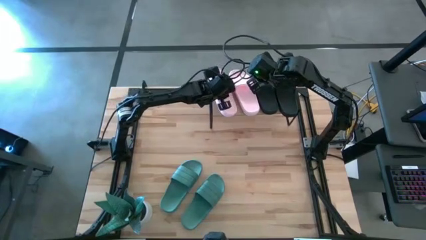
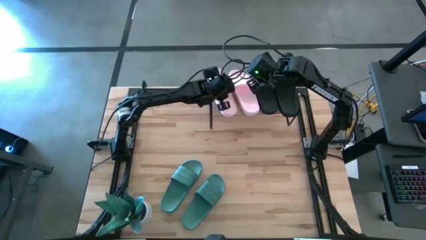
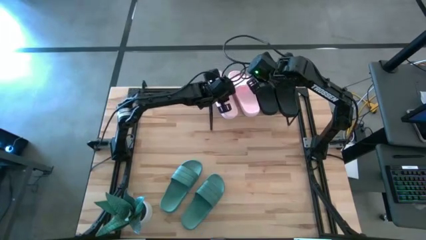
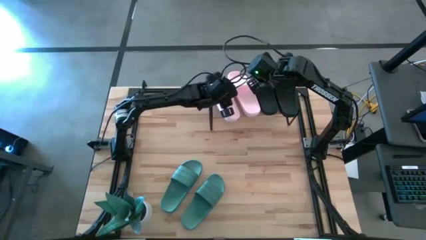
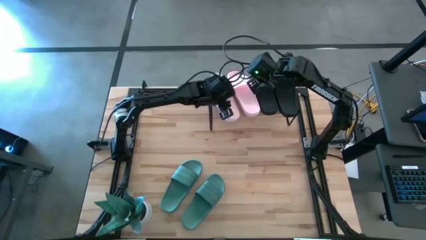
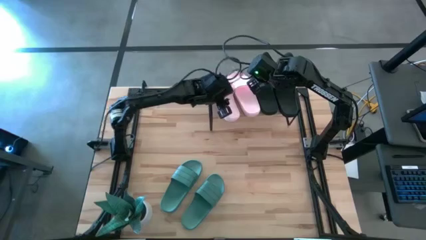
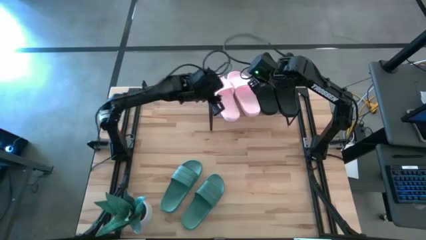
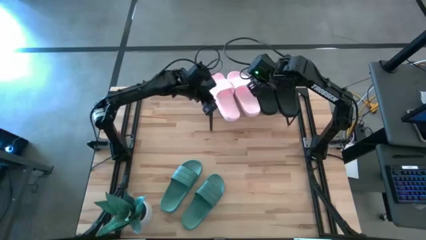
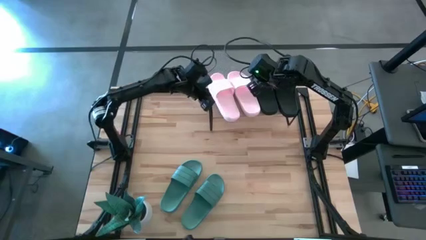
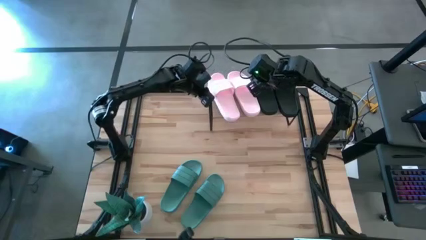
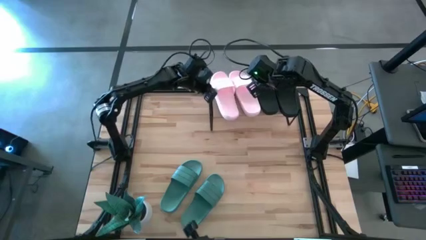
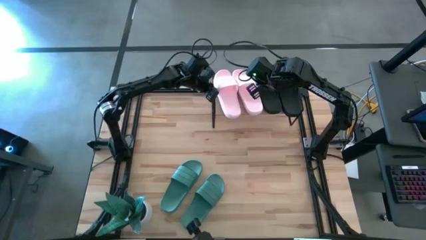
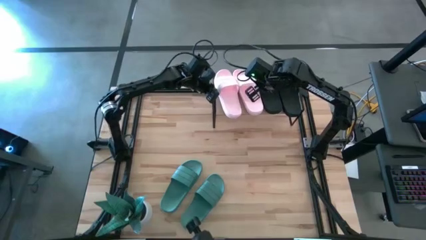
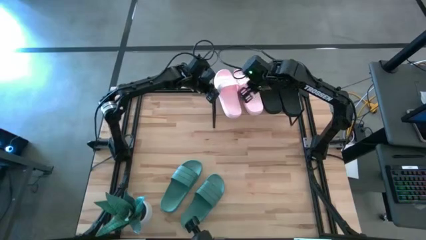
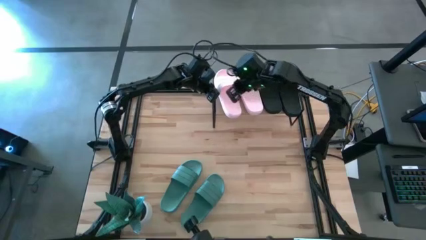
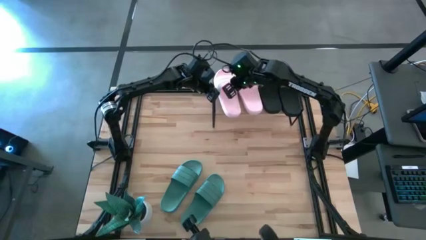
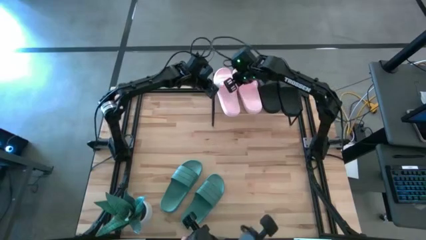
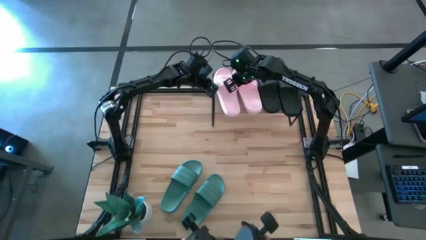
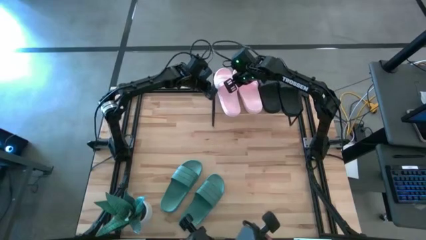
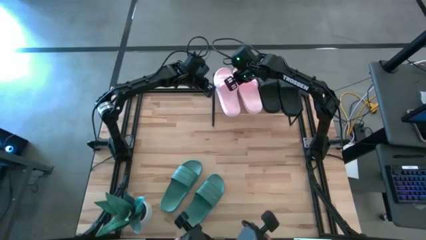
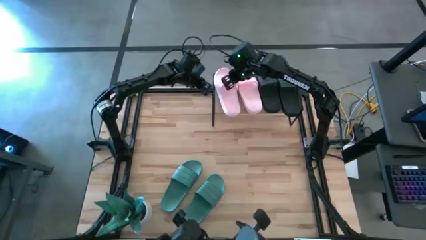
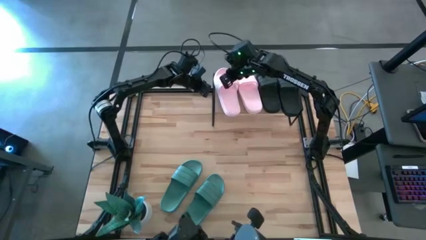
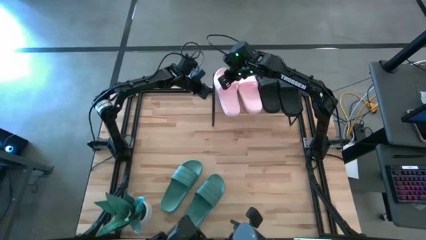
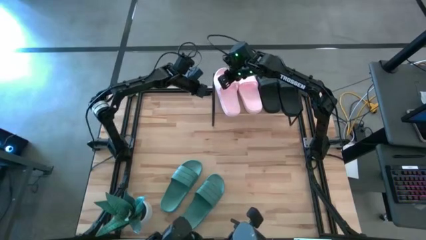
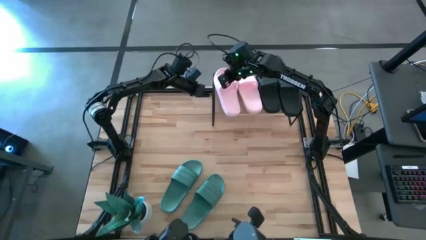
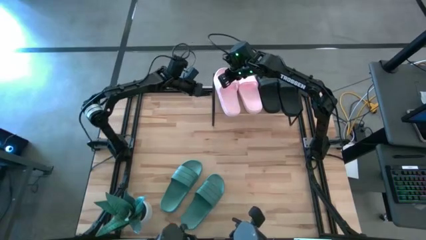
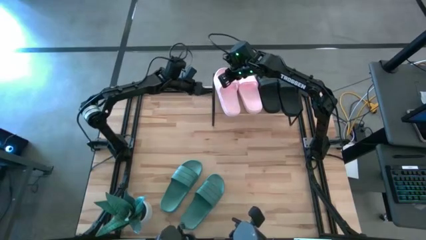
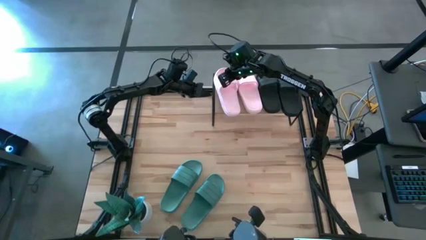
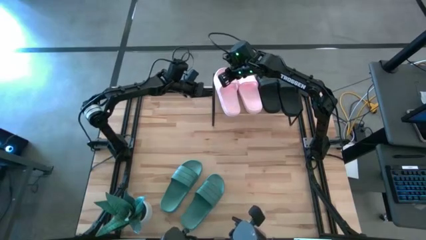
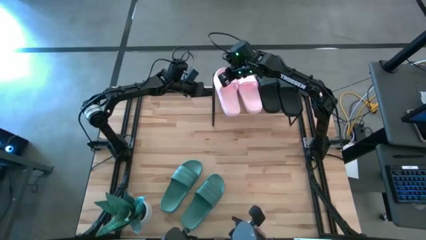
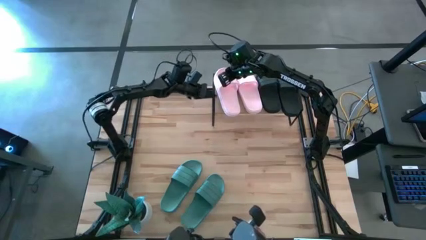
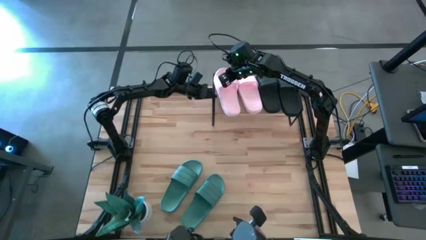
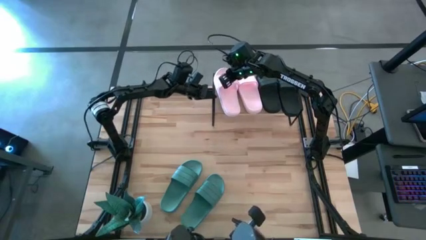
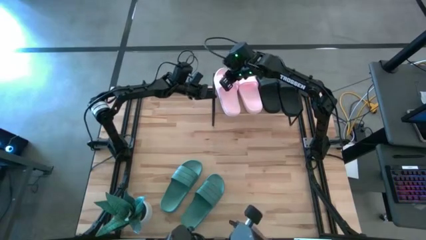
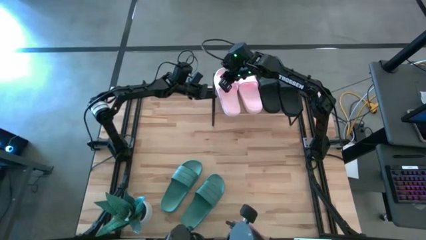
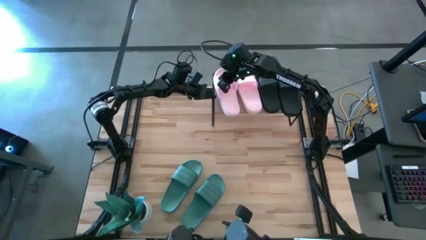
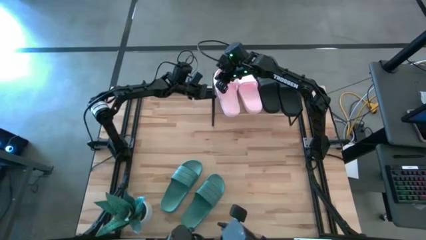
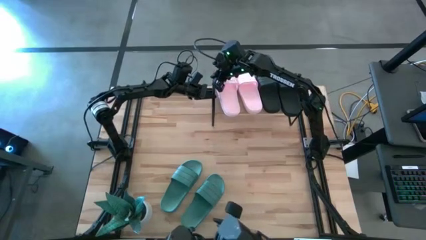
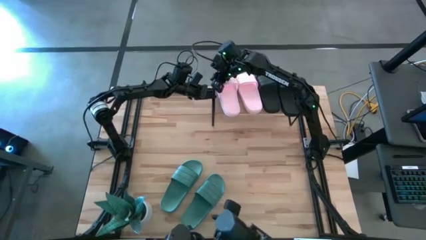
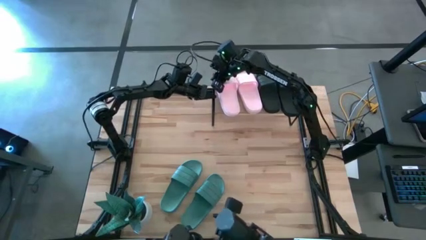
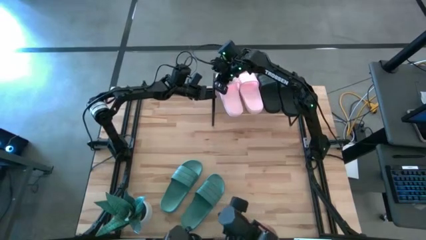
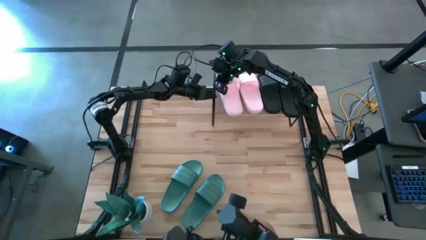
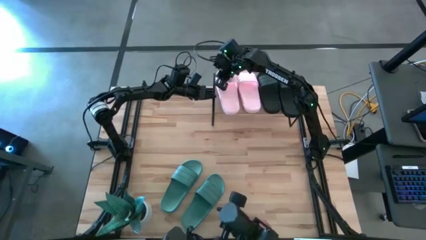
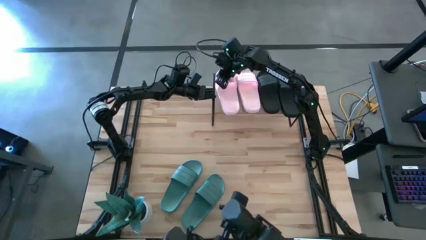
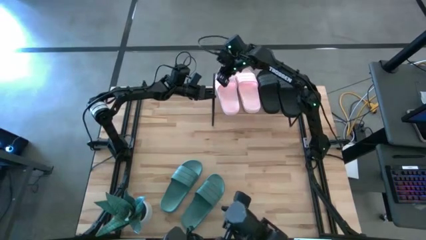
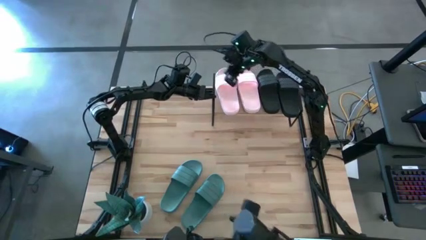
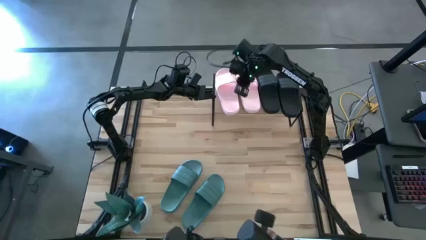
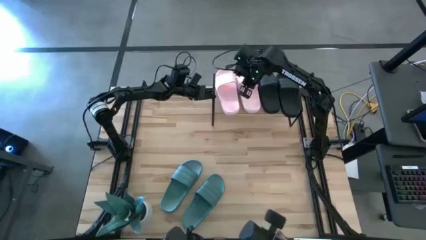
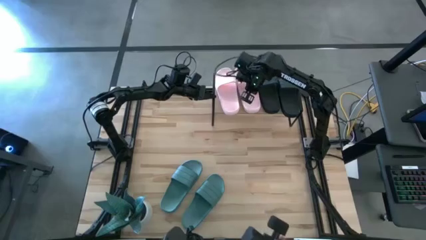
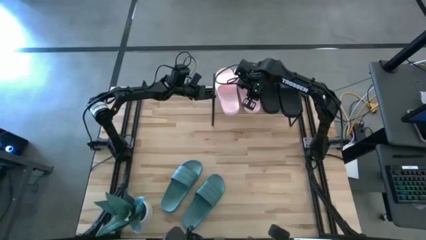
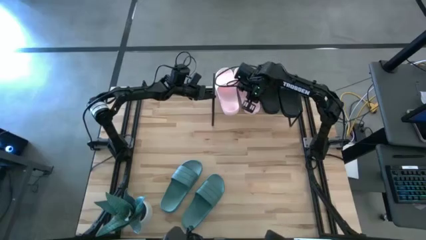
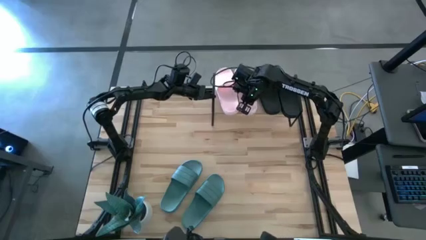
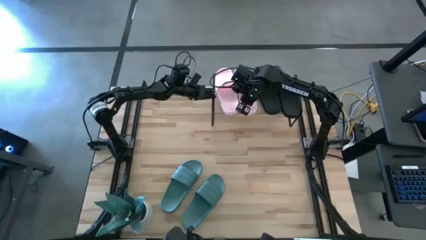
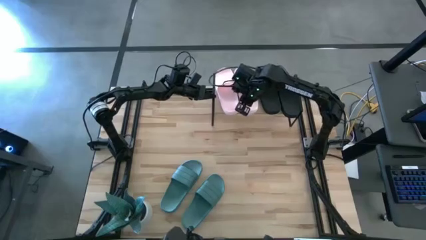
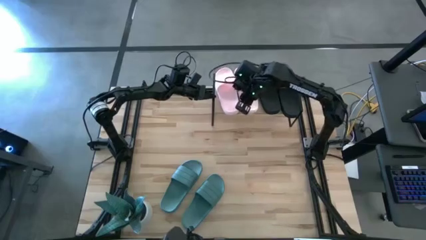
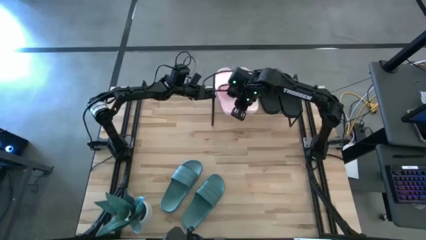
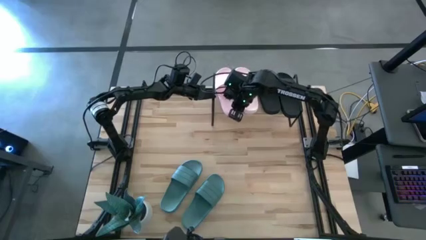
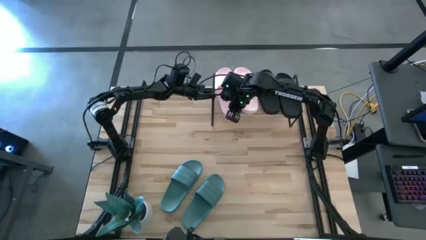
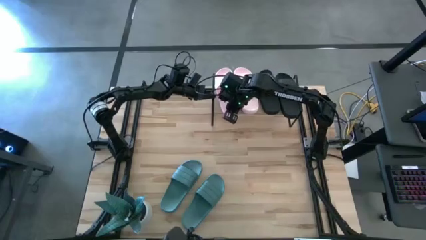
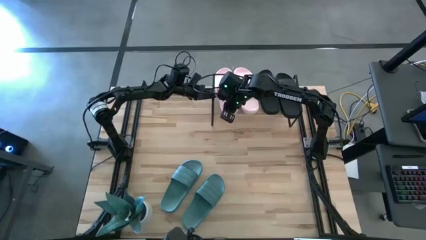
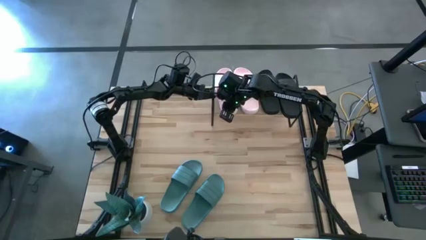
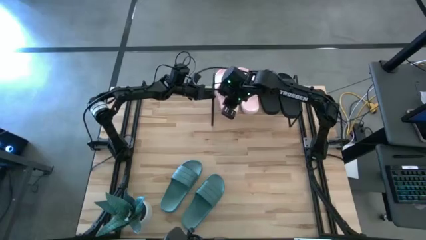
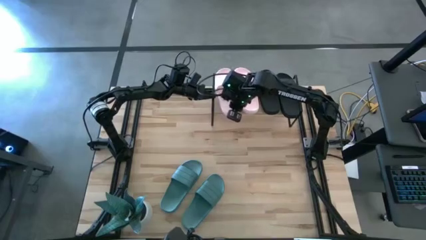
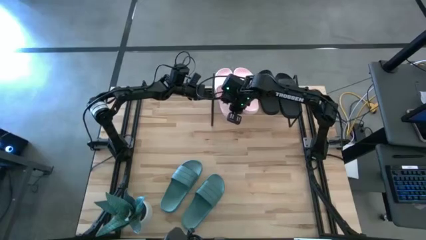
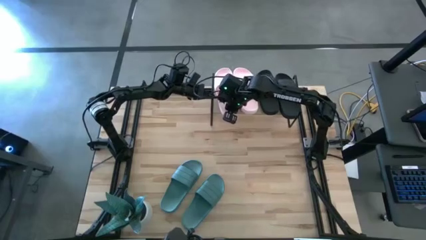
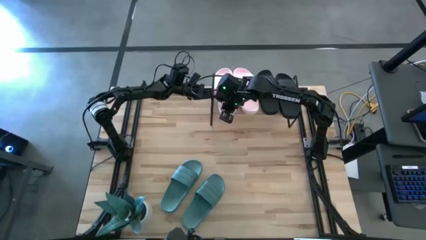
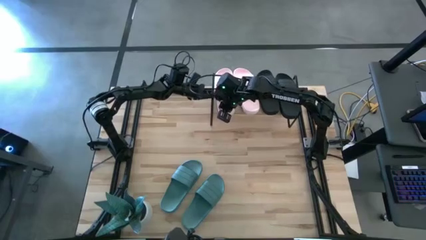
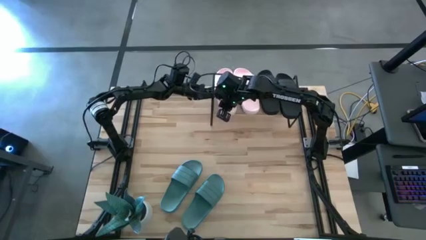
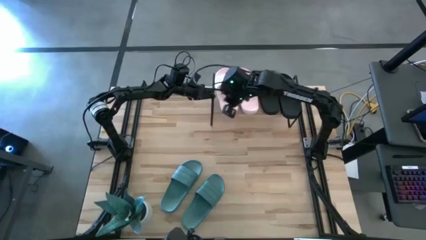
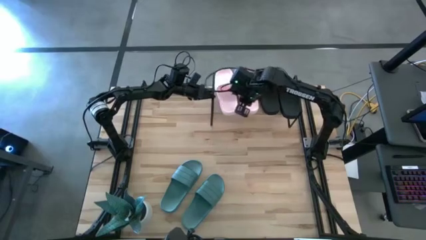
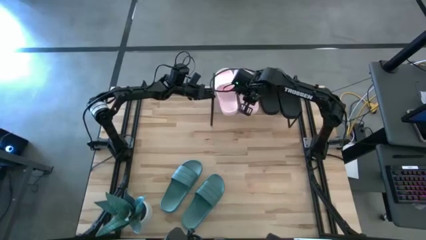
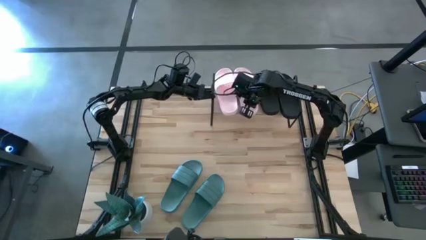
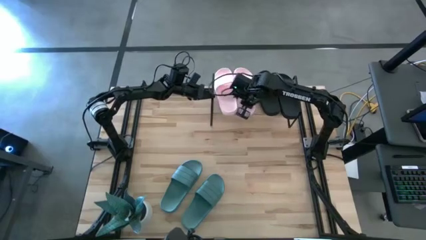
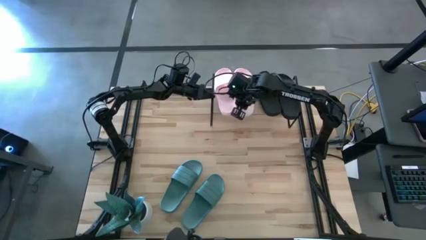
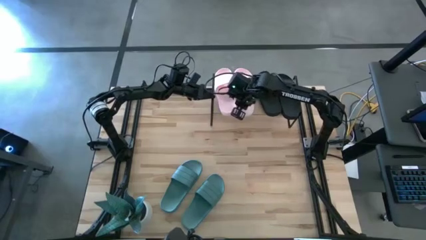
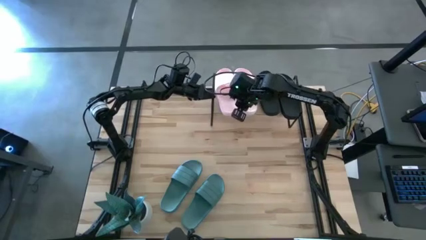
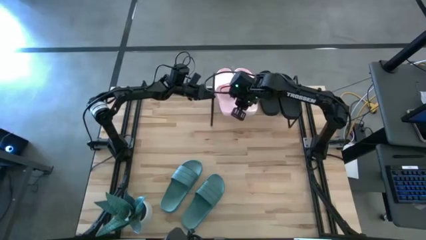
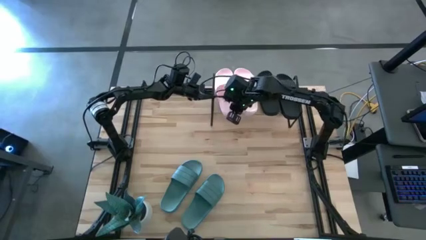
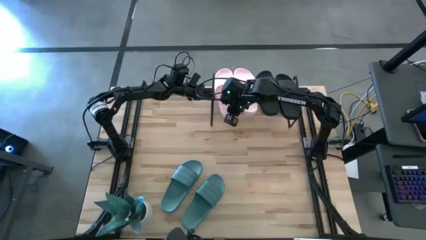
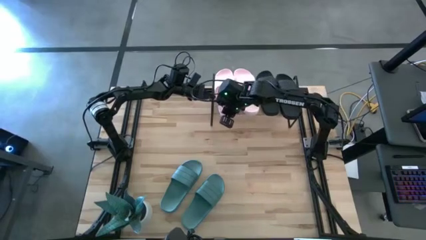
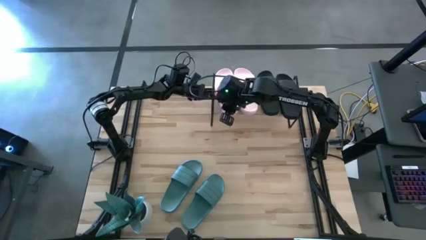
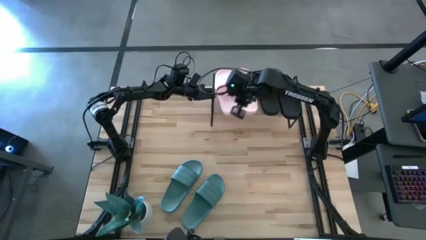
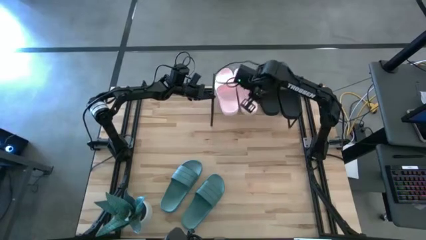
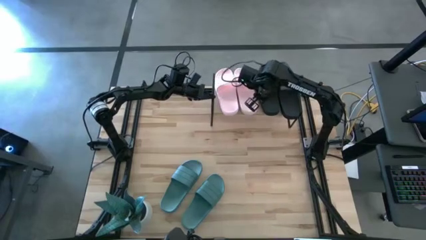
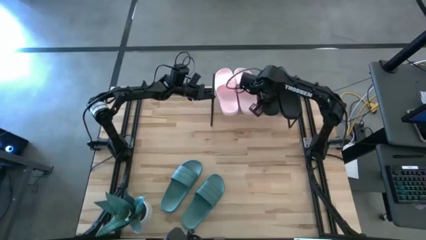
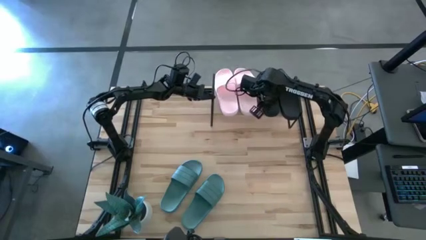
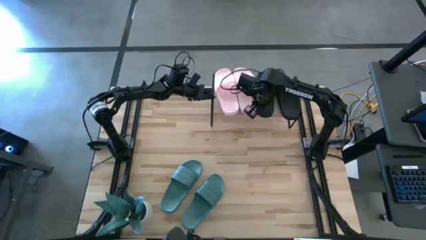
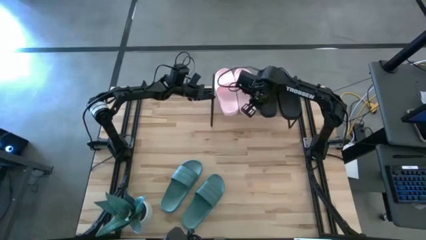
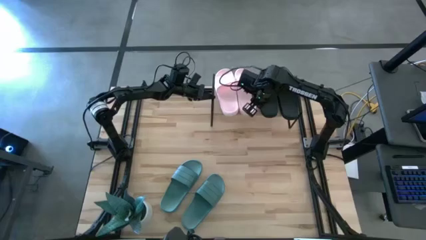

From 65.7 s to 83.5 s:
Task: Pick and place slides into the shelf
Adjust the pink slippers on the shelf
